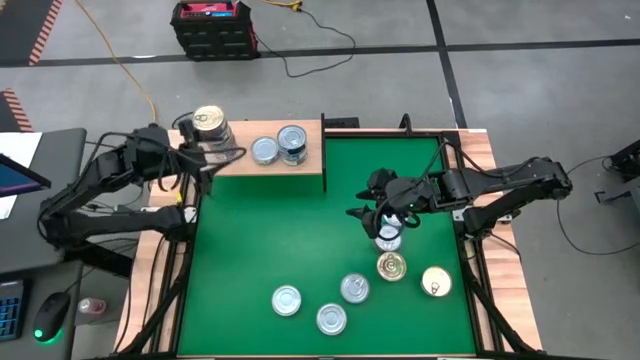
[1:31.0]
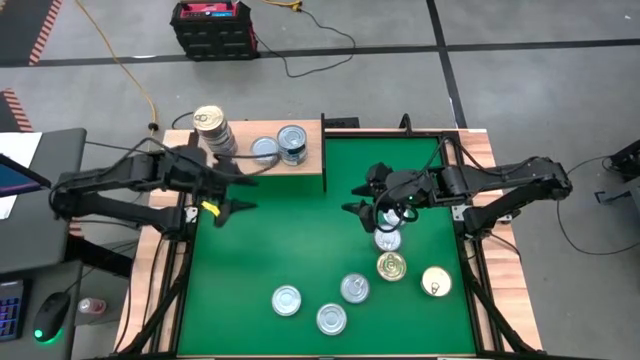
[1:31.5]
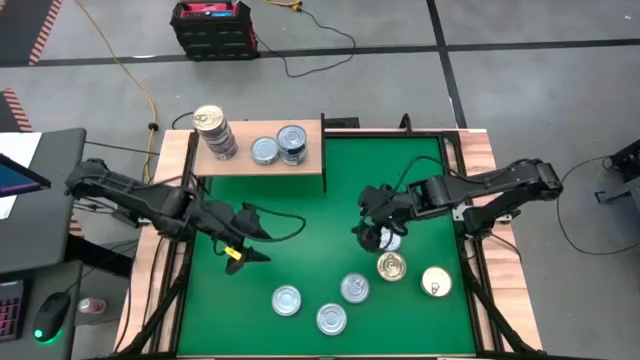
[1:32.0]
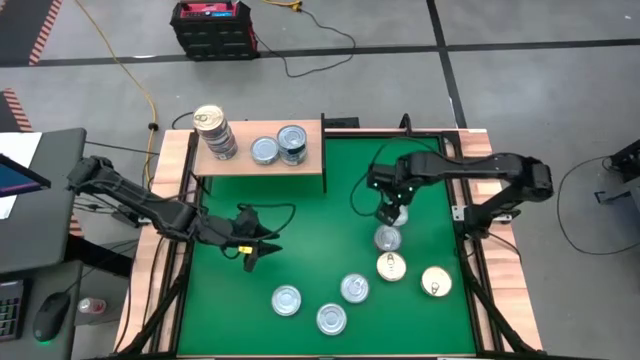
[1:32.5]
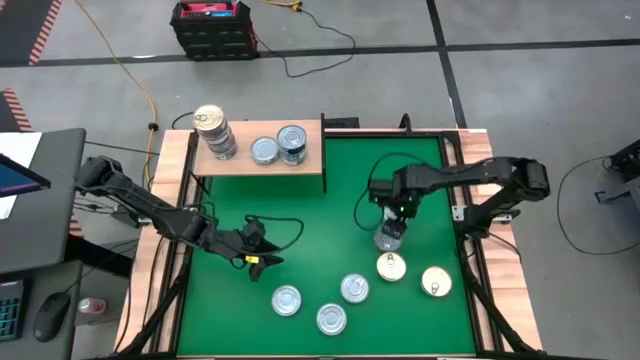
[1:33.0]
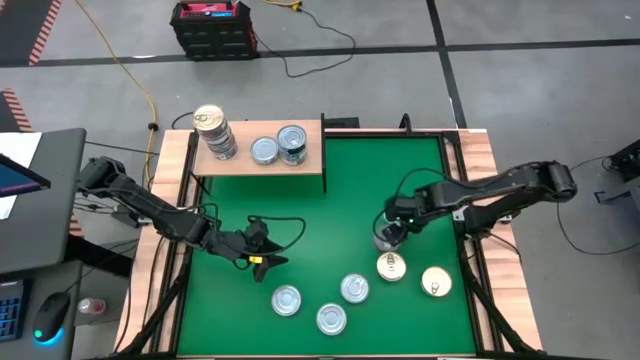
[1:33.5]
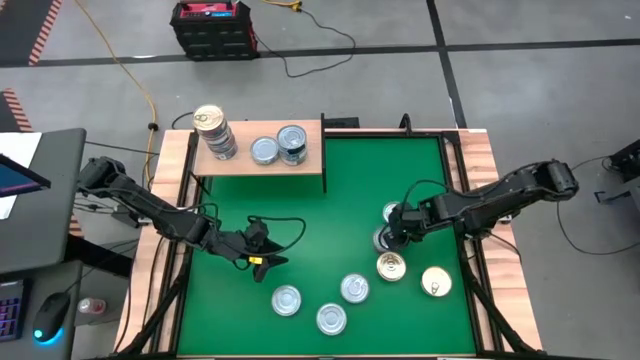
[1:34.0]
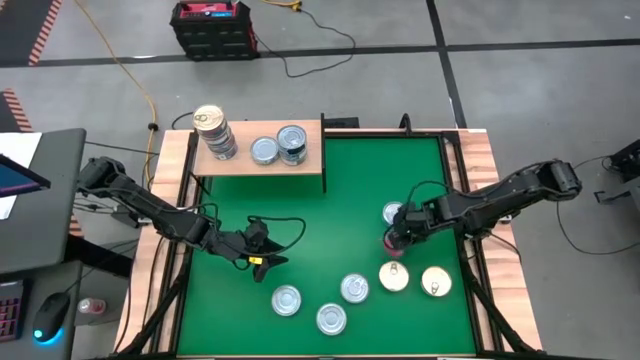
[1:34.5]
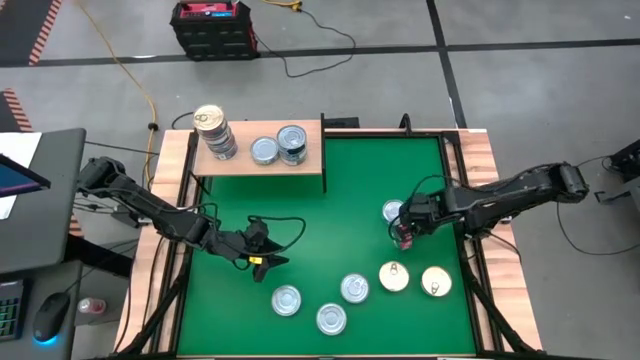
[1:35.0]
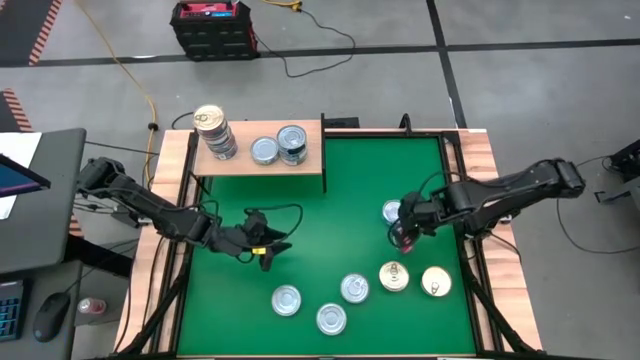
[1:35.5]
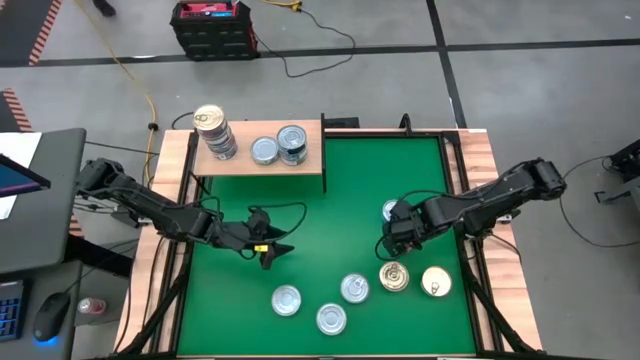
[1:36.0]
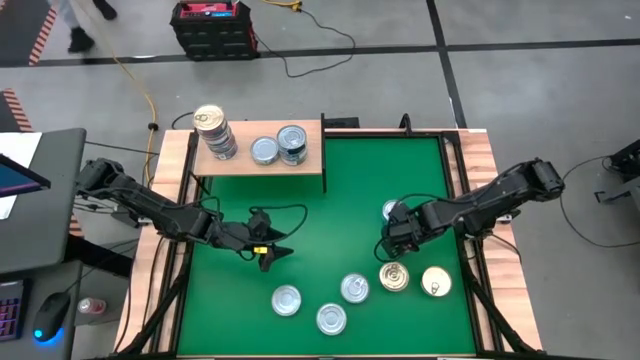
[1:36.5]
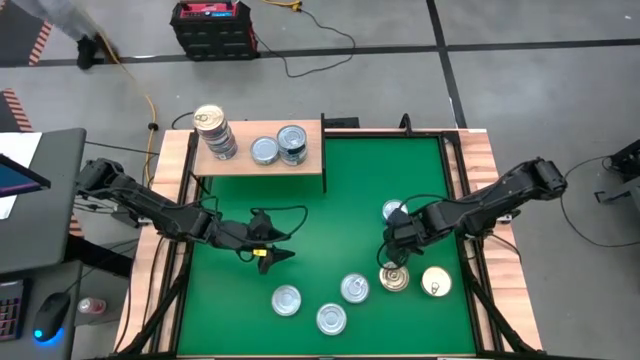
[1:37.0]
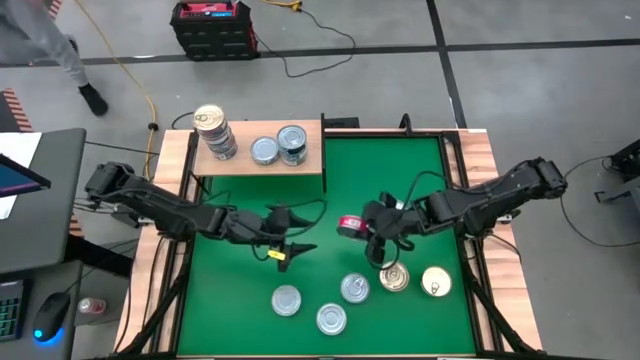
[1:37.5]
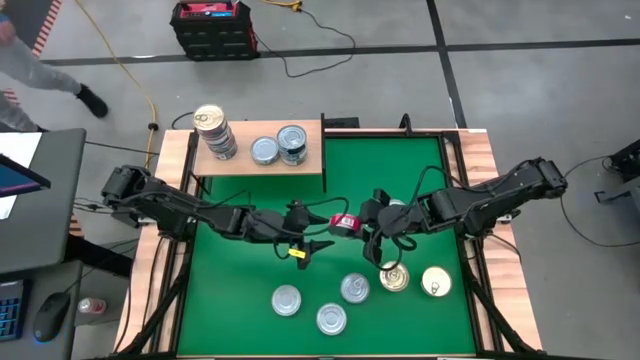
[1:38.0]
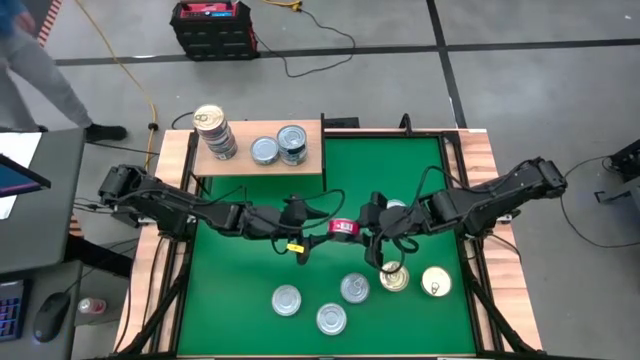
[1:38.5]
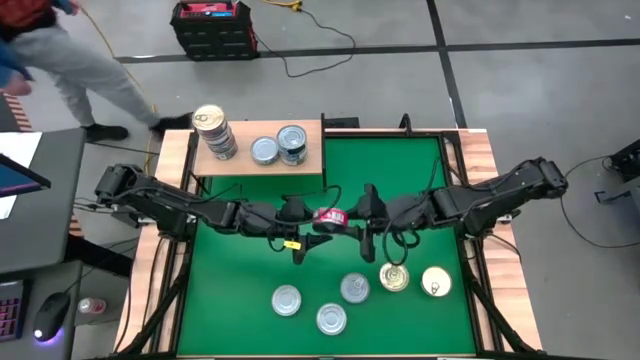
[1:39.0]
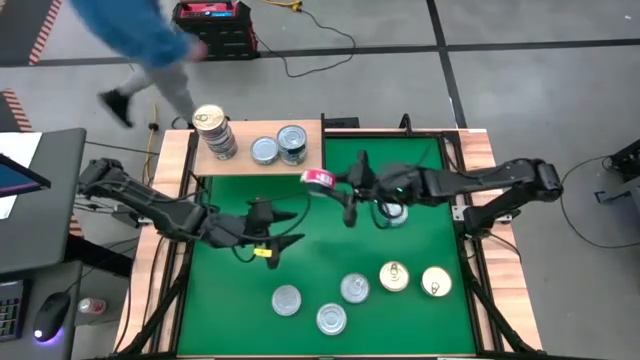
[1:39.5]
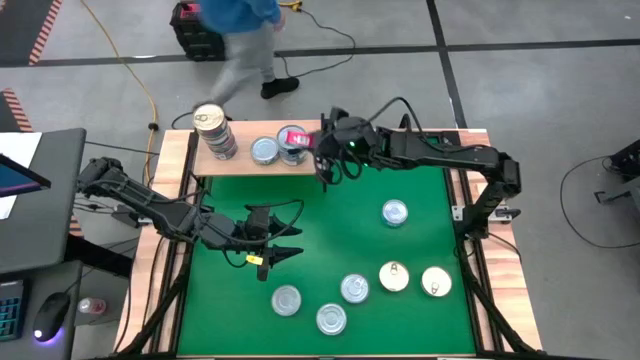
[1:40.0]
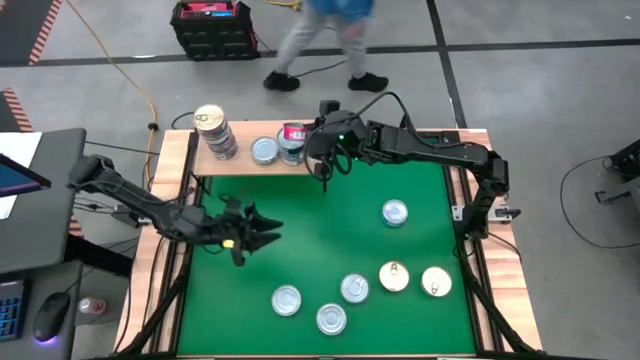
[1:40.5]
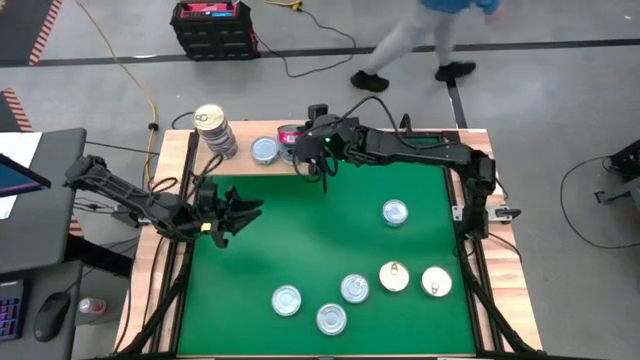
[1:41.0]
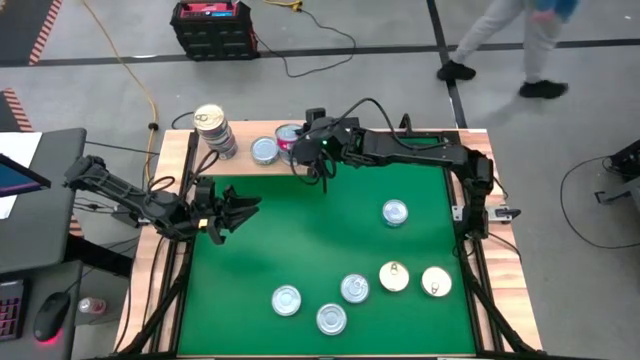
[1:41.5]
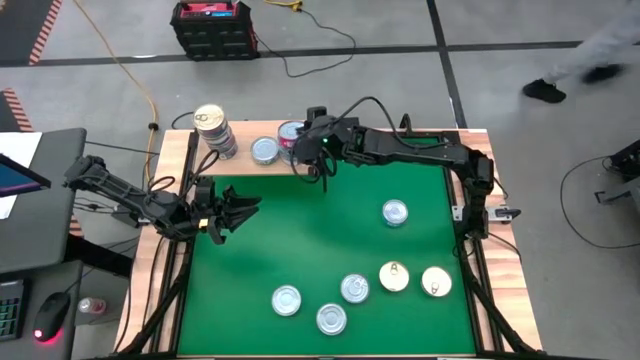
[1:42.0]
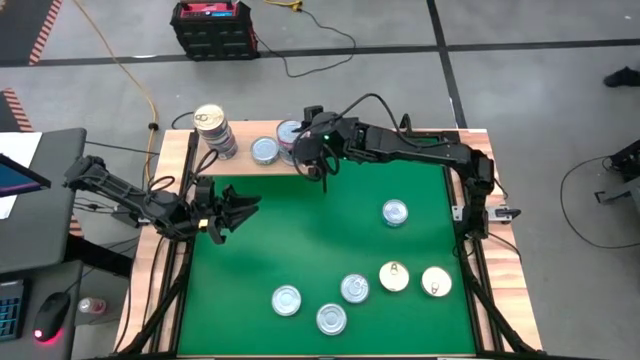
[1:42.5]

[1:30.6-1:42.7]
Task: Stack canned seafood by type on shelf
Stack the red tuna can on top of the dark blue tuna can on the shelf

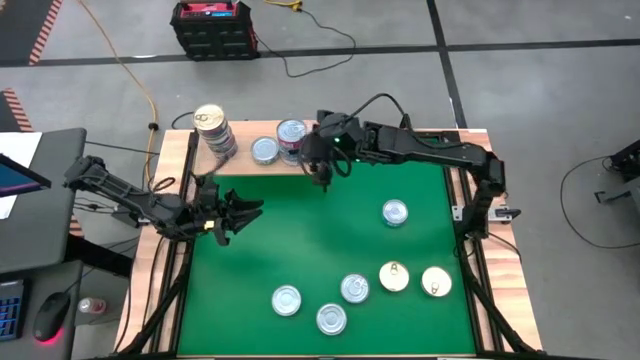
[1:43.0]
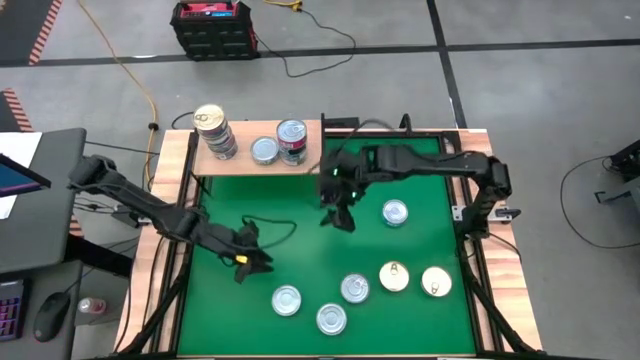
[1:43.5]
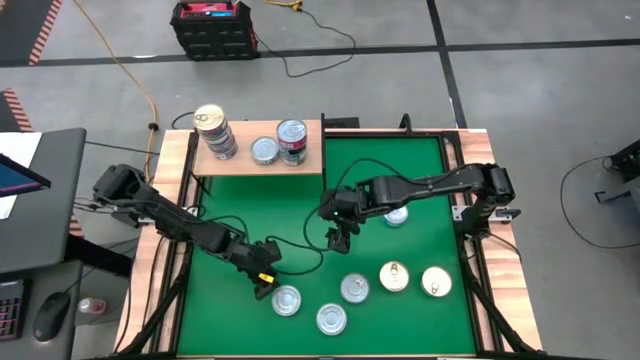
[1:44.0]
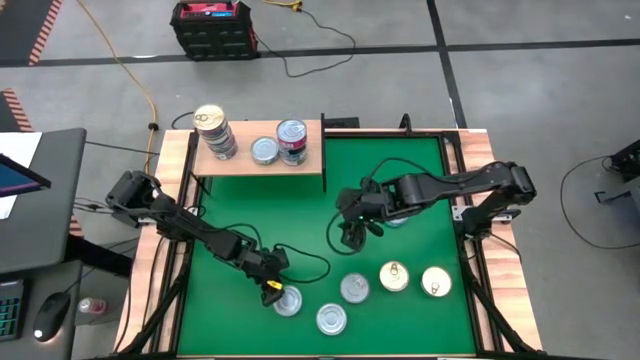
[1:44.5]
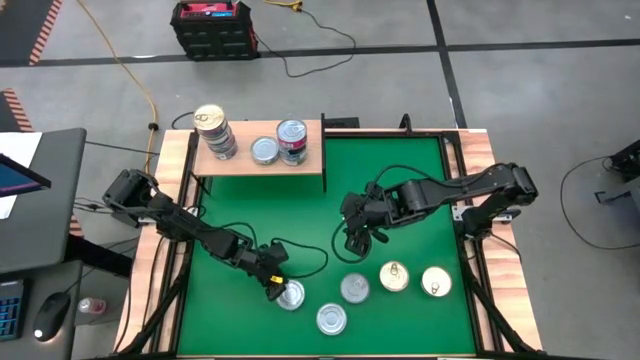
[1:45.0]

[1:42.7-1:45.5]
Stack the green tuna can on top of the green tuna can on the shelf

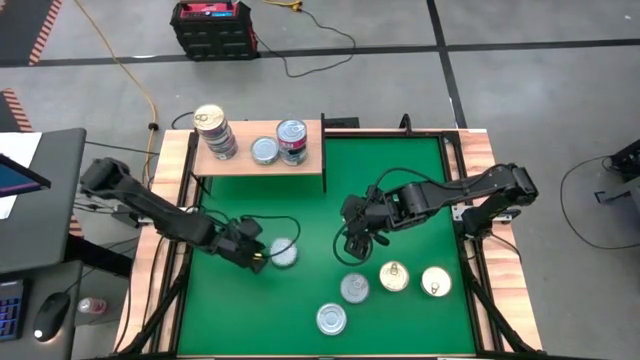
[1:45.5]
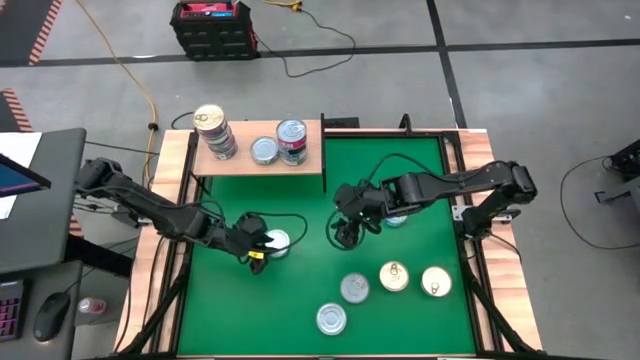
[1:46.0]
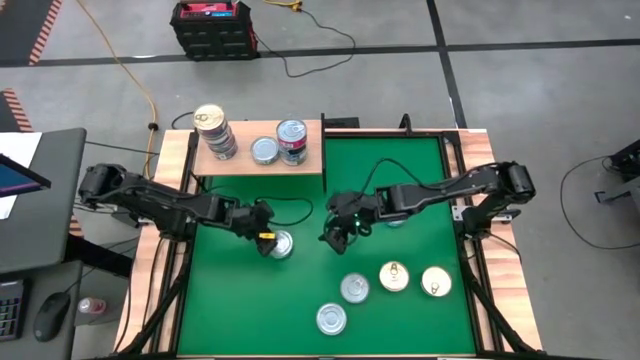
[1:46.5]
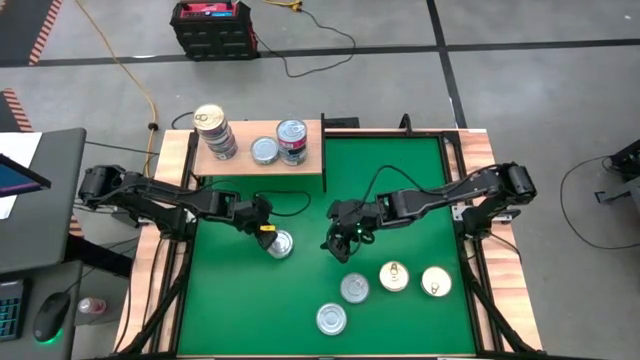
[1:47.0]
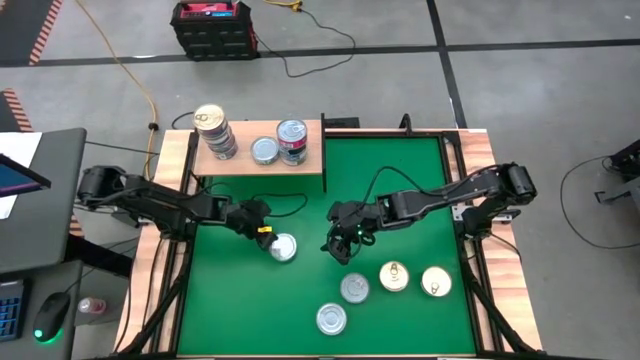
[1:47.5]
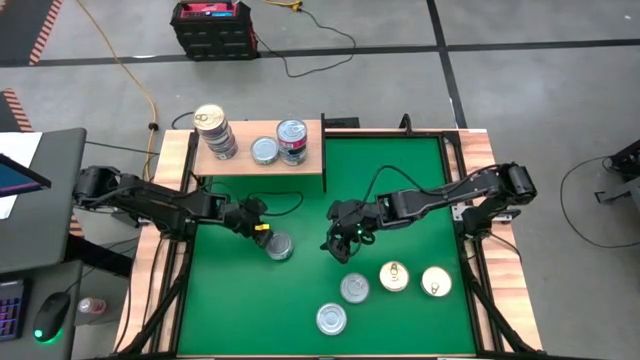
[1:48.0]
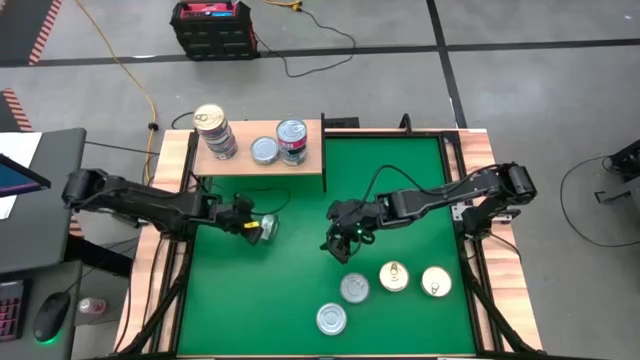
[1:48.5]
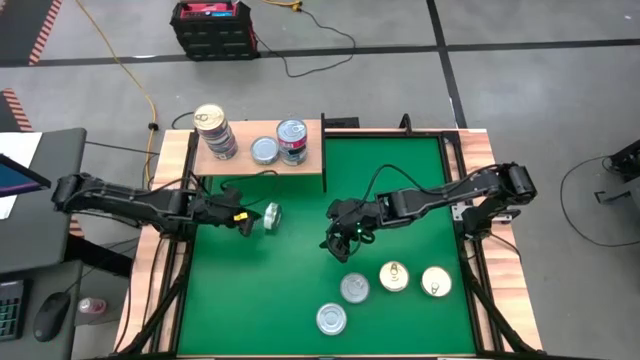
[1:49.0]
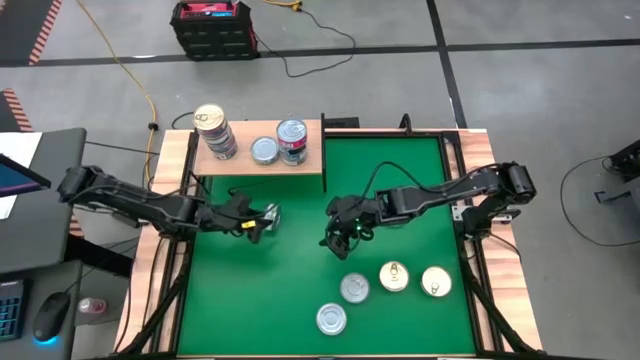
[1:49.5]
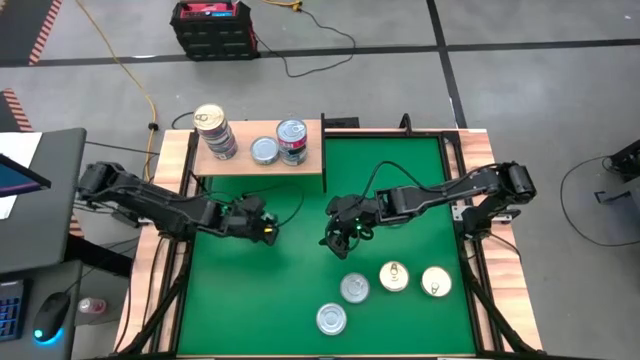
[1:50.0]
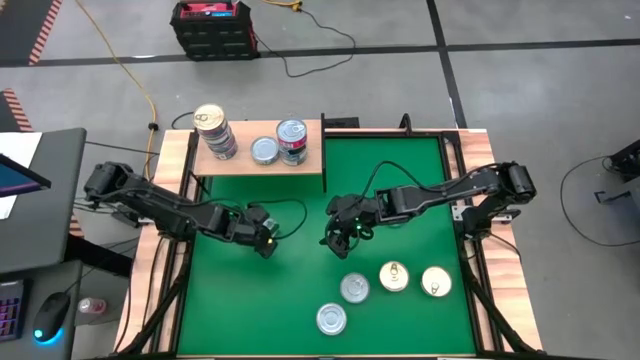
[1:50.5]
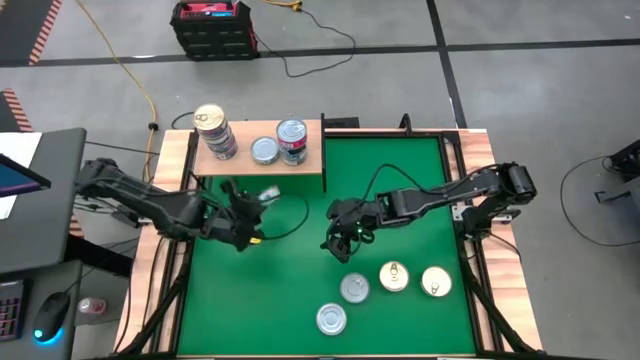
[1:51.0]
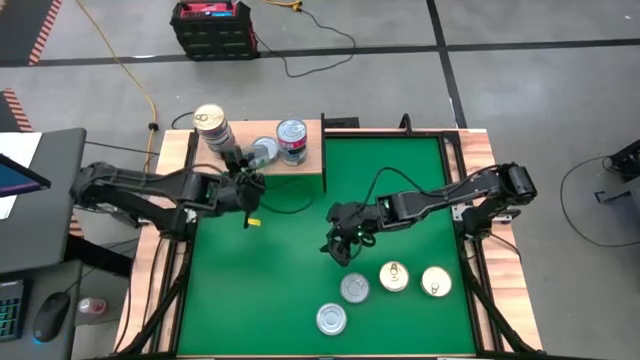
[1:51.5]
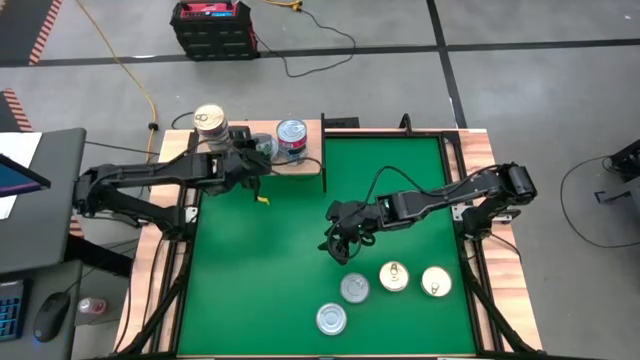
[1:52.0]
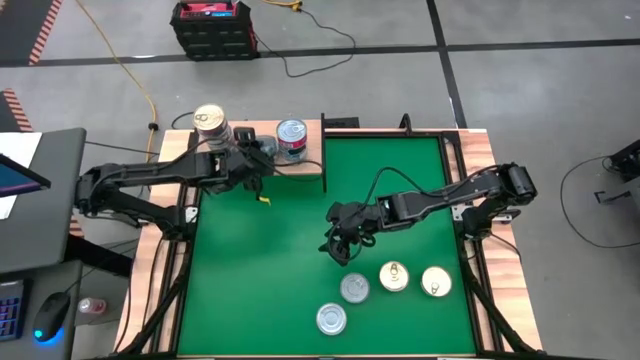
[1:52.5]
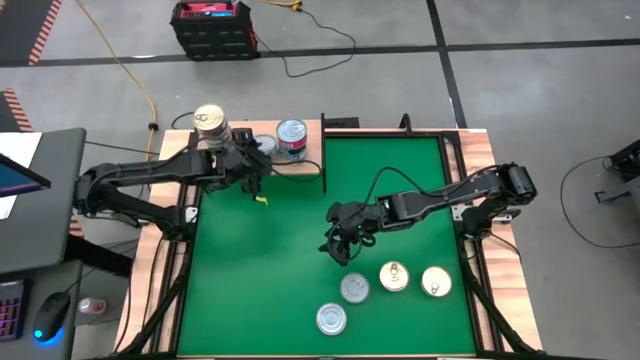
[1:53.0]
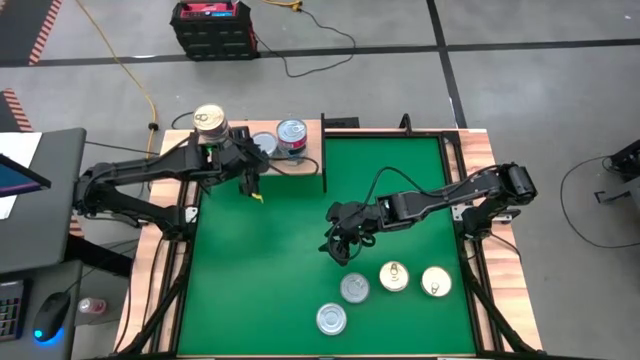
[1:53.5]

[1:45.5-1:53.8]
Stack the green tuna can on top of the green tuna can on the shelf
